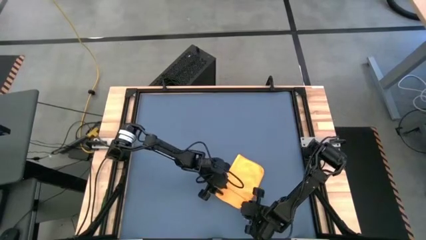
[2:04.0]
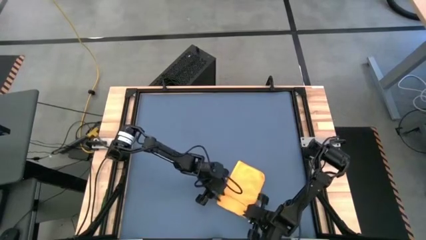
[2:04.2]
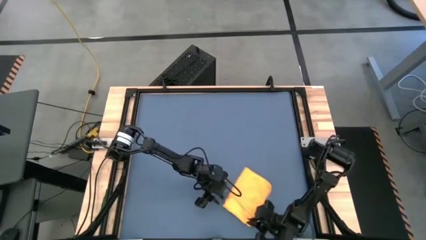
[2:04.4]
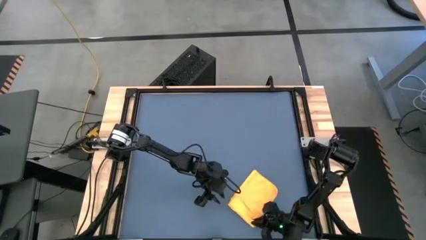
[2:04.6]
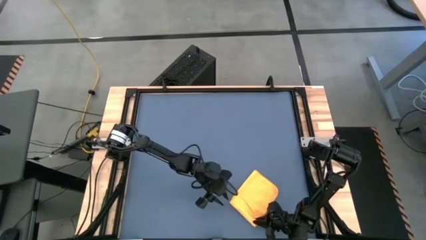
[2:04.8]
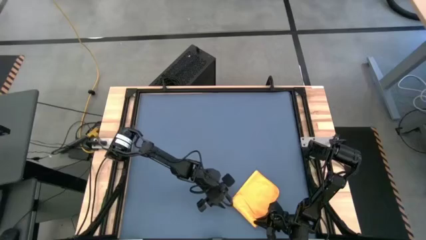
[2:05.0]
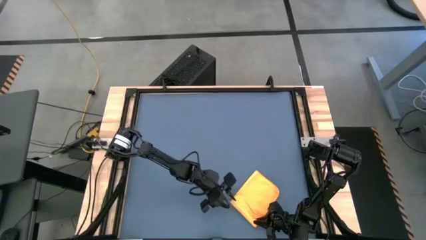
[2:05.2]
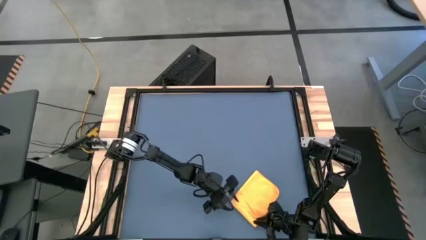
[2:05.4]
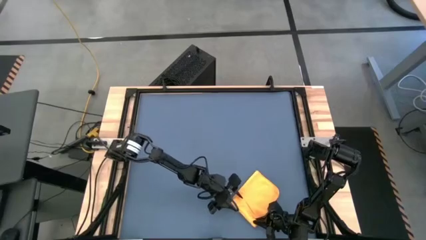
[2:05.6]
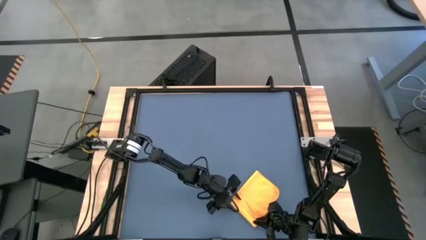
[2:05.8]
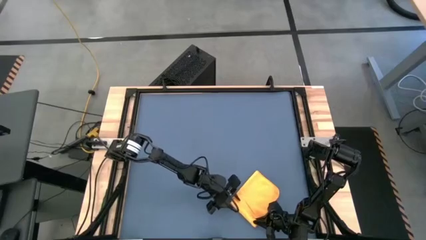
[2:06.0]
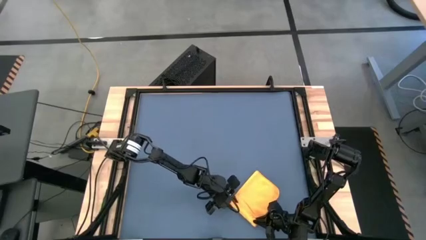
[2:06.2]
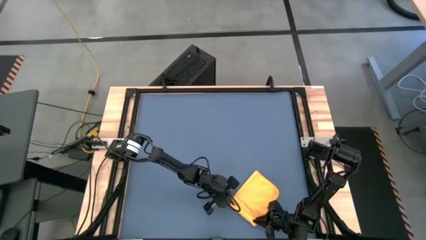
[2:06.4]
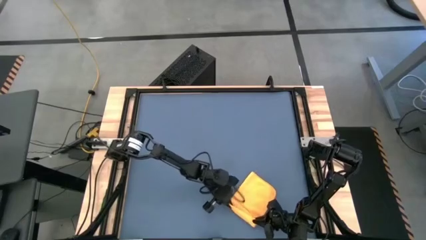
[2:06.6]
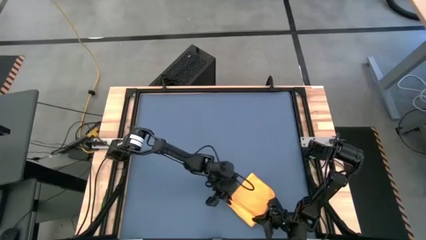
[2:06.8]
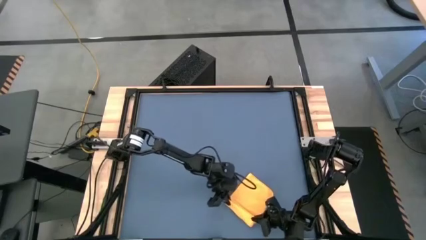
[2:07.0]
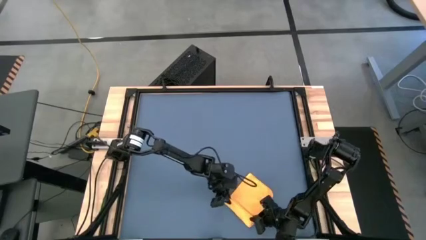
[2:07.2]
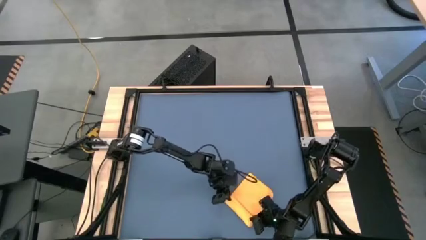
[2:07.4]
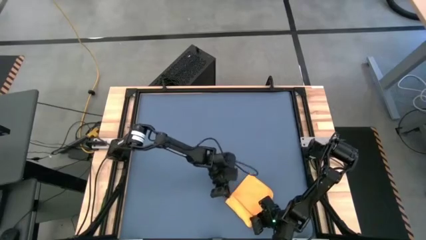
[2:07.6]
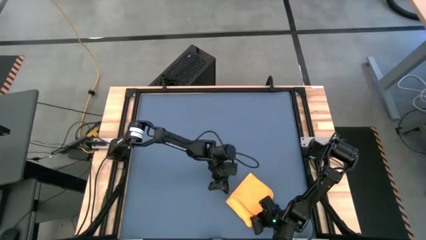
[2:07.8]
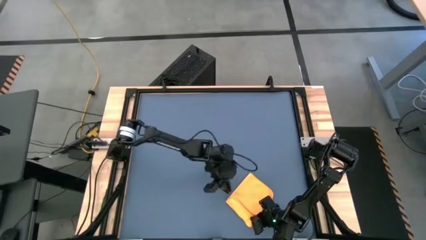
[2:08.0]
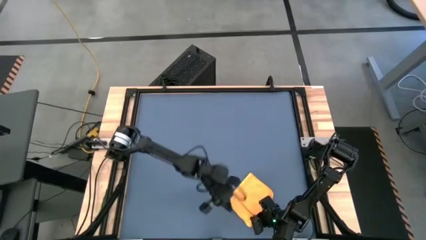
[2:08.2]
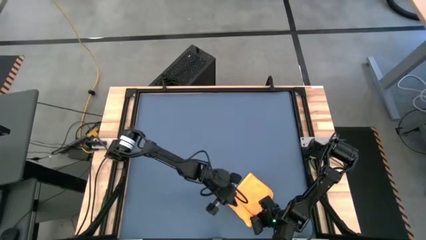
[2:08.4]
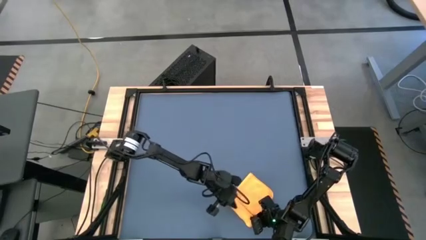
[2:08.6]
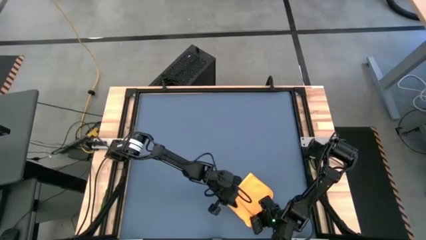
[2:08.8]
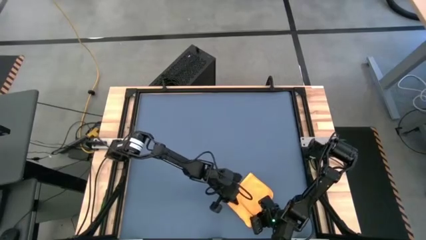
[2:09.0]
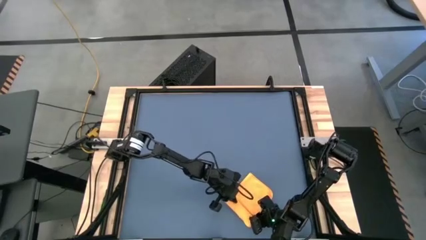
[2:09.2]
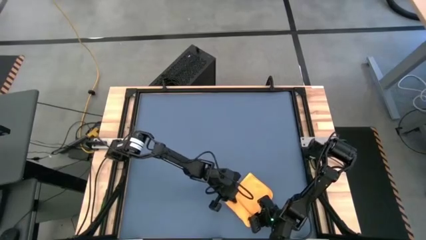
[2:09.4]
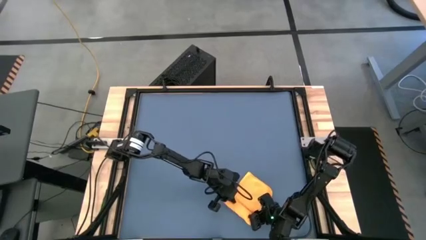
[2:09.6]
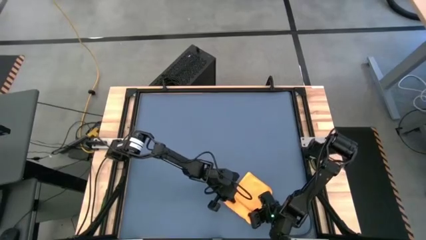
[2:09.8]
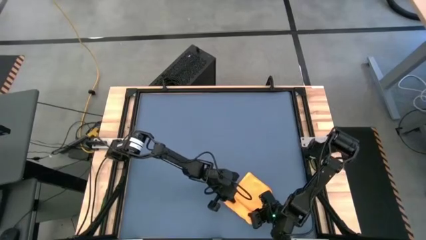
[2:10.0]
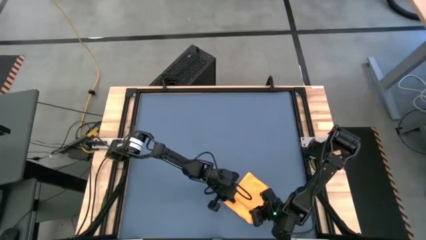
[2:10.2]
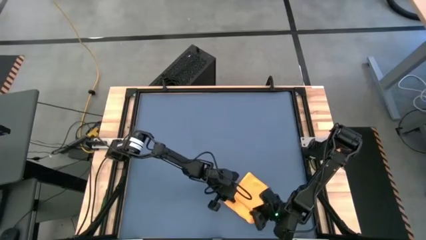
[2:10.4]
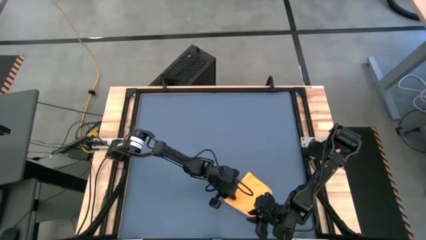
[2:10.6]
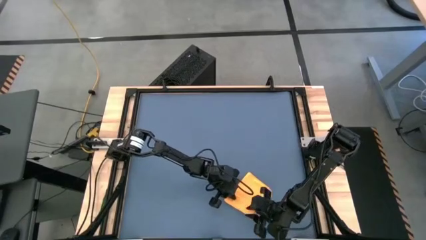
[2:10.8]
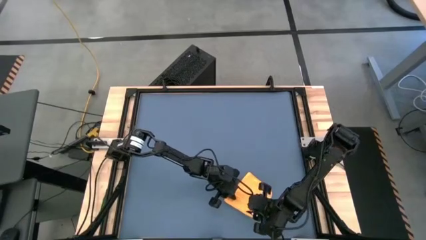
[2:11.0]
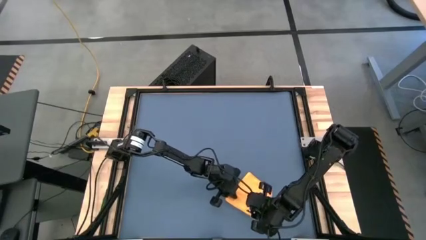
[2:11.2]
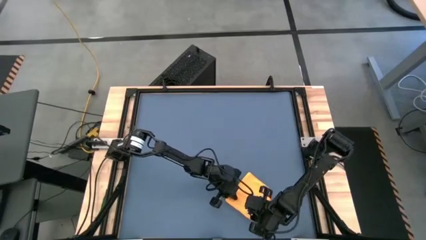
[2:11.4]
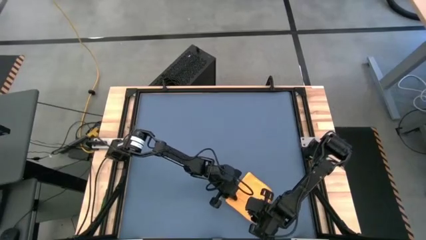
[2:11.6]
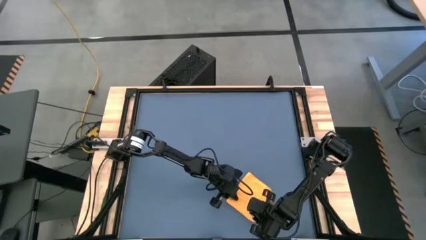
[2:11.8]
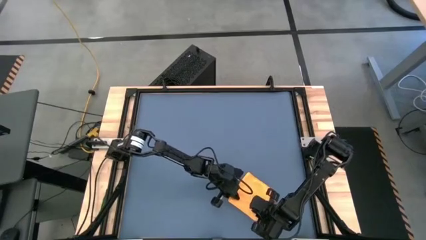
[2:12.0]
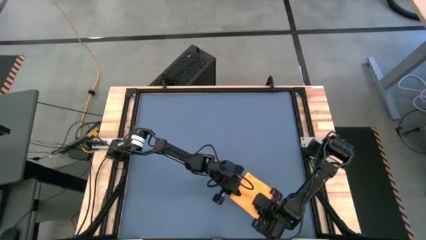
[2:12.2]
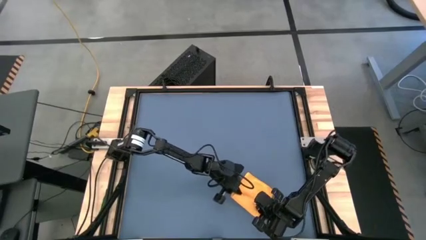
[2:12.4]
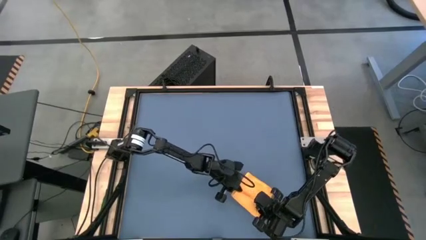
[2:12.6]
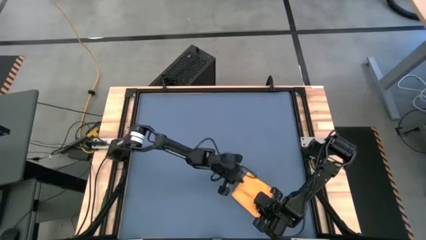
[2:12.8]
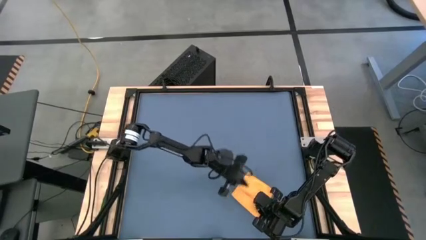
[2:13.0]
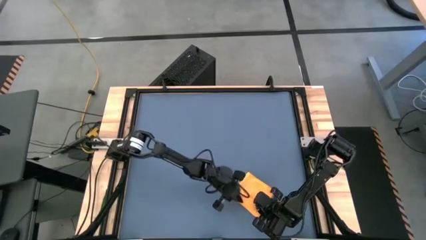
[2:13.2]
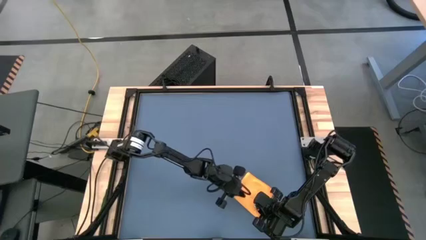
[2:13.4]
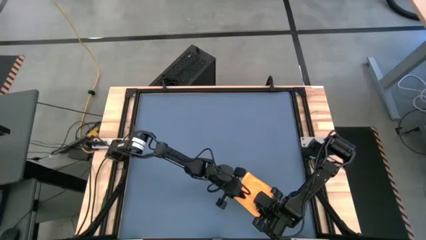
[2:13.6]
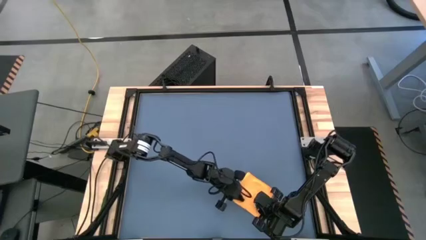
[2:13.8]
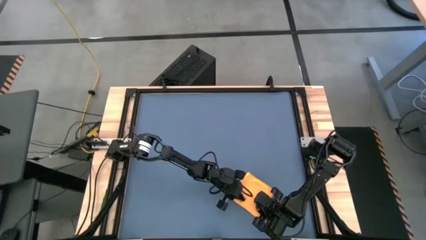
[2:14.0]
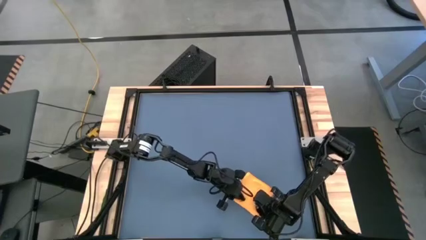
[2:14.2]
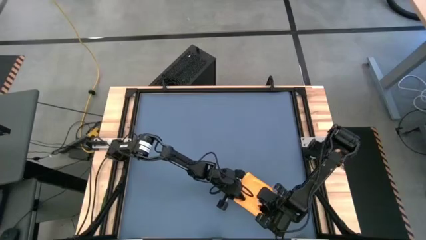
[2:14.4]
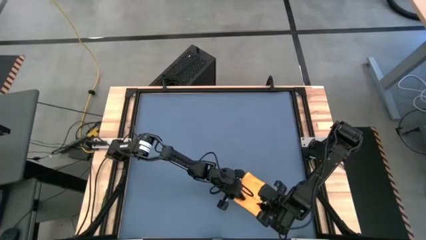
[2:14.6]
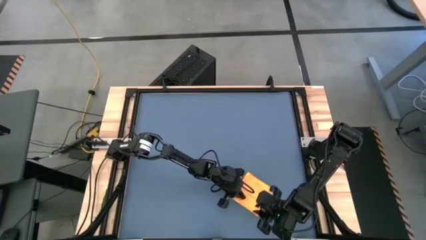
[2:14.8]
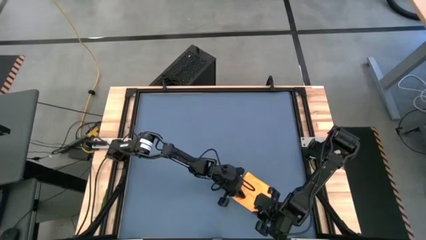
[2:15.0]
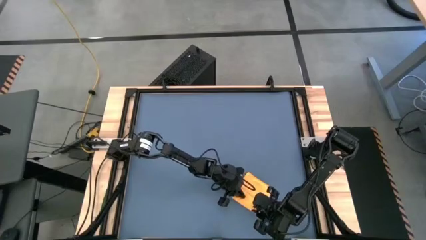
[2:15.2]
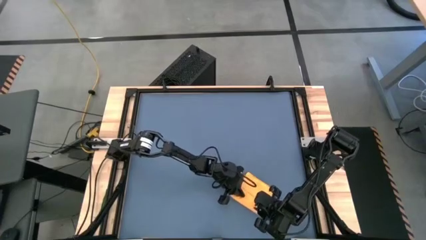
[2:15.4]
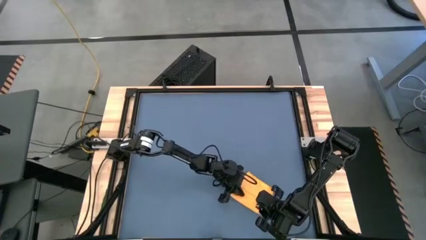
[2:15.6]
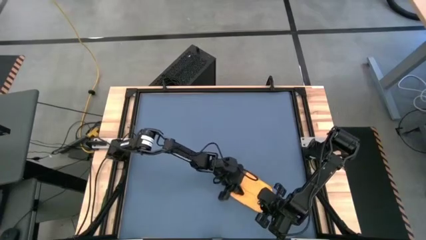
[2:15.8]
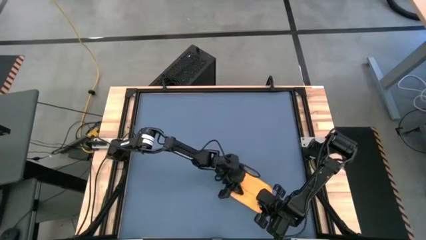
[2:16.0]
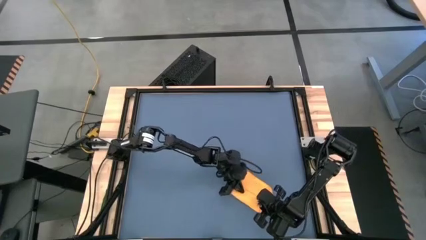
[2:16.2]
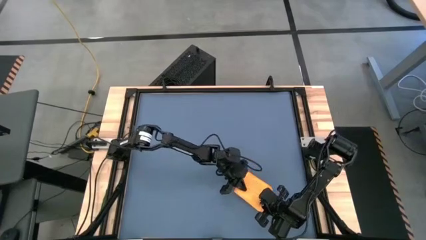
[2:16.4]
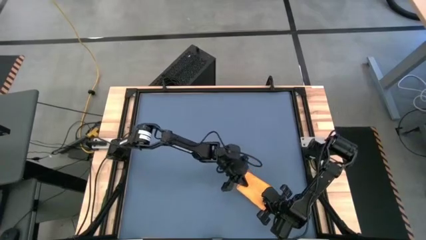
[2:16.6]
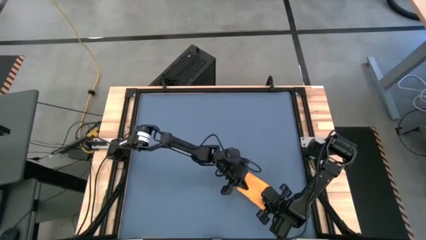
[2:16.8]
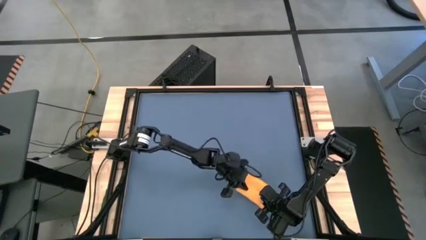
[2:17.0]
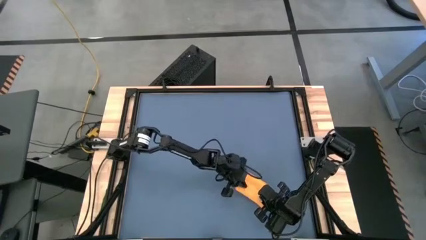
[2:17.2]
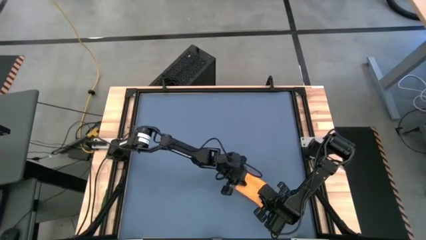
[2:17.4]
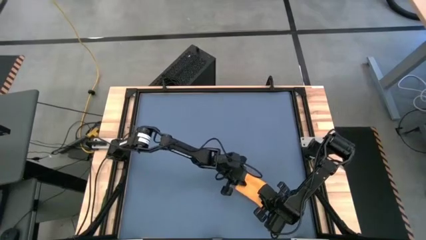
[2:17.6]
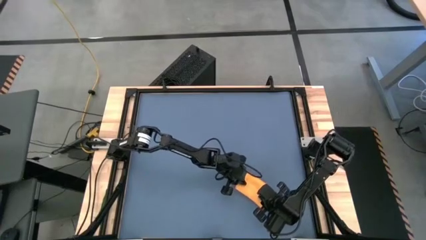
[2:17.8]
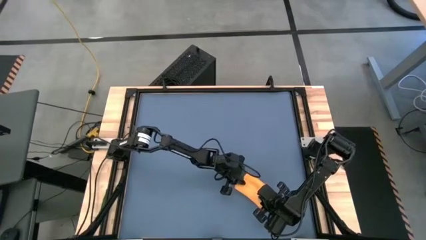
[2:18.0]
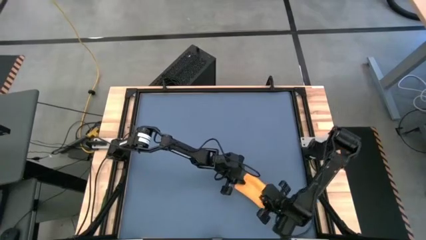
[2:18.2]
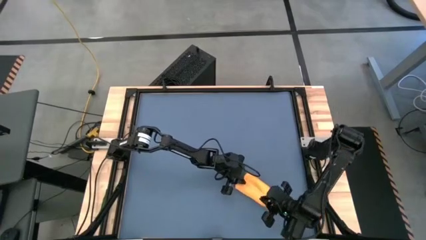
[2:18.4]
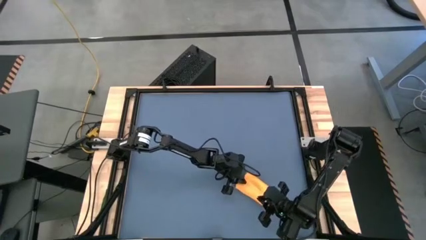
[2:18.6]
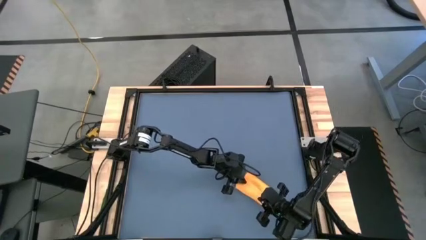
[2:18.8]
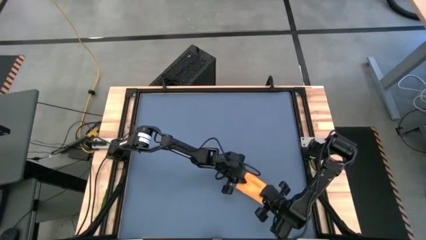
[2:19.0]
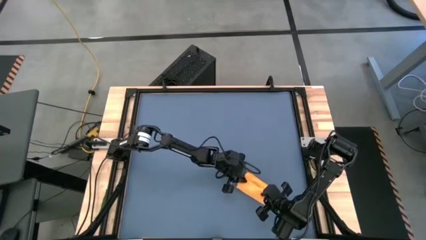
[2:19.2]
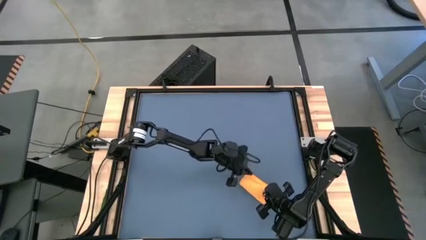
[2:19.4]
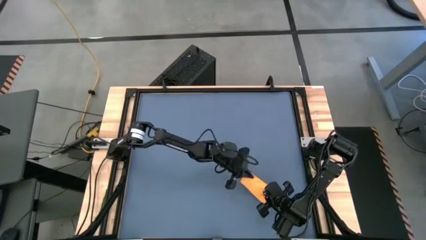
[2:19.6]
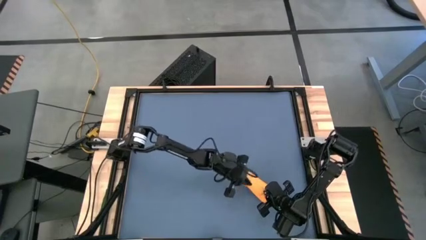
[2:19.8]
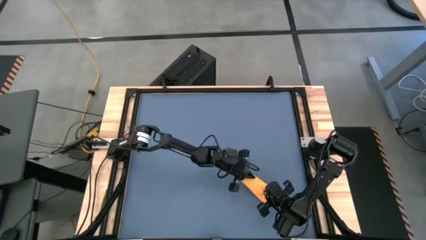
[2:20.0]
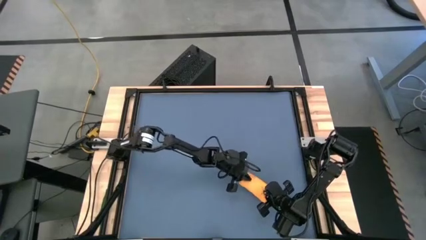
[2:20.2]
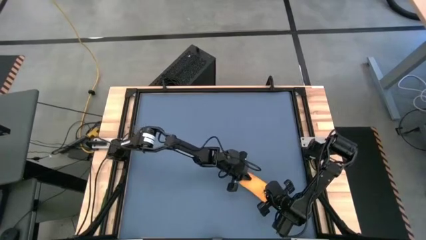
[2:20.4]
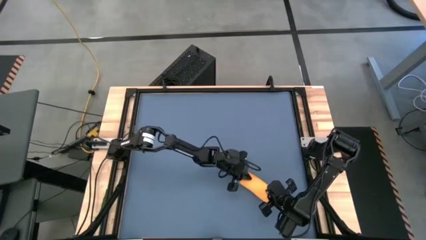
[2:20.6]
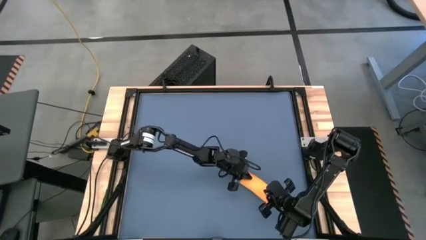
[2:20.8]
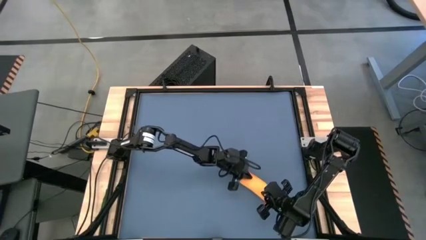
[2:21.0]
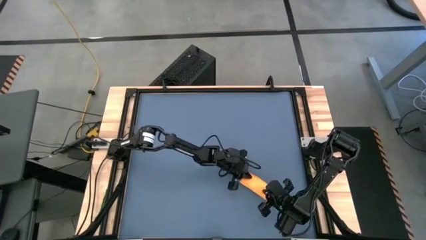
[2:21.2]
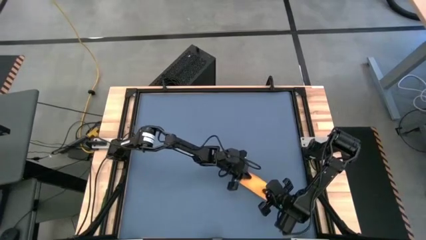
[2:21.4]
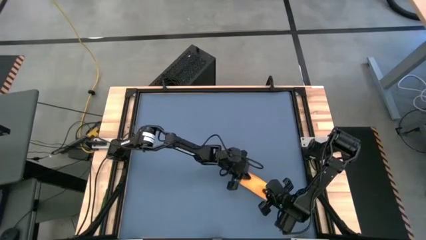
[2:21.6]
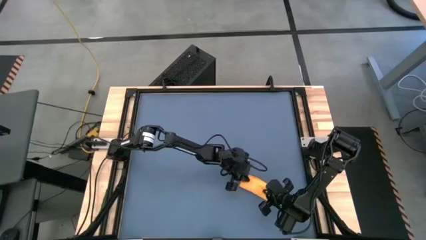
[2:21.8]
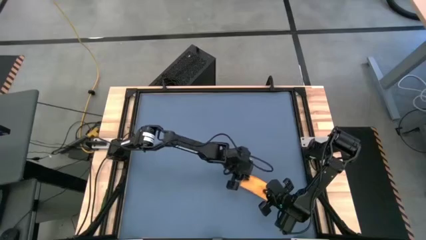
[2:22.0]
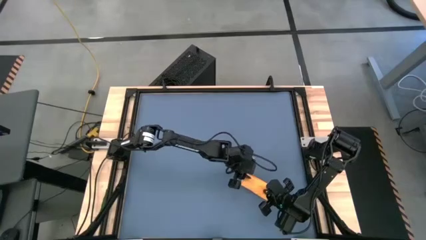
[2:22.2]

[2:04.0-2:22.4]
Task: Roll towel
Roll the orange microfiber towel
